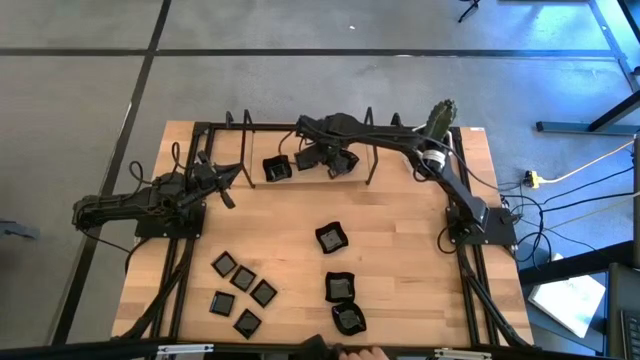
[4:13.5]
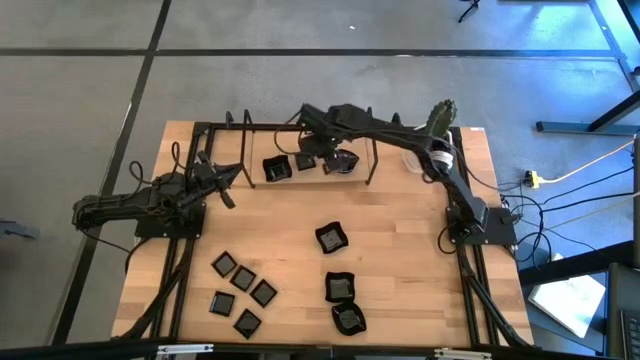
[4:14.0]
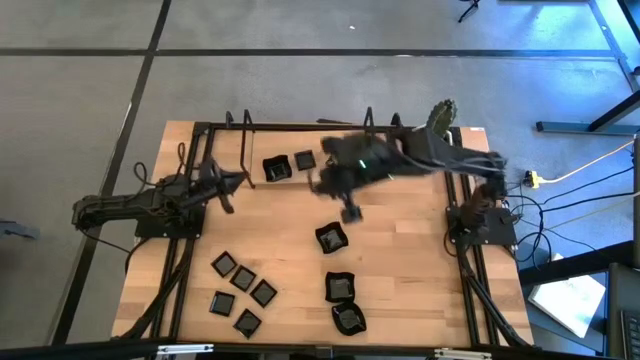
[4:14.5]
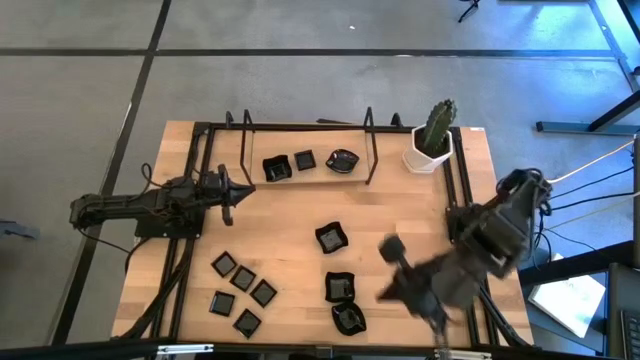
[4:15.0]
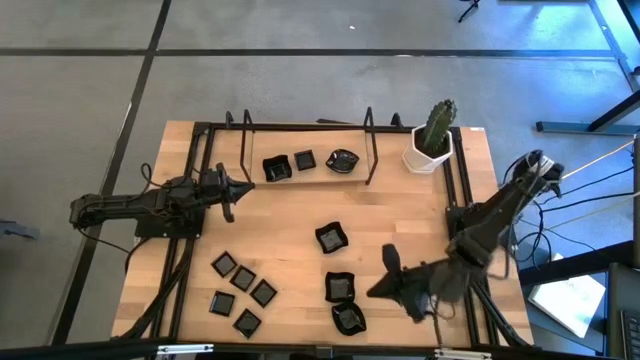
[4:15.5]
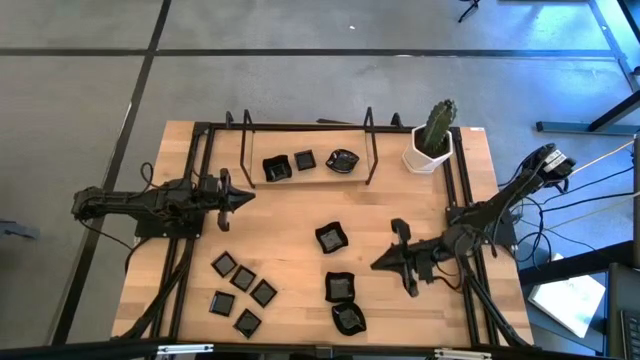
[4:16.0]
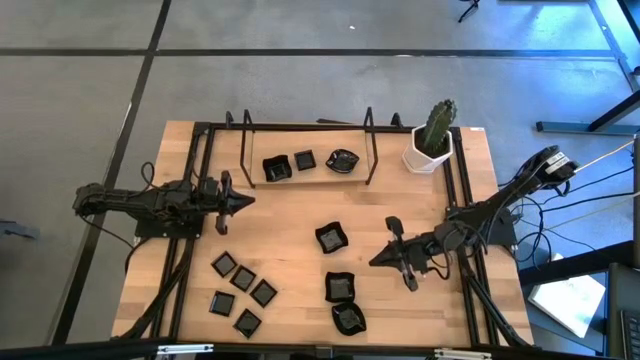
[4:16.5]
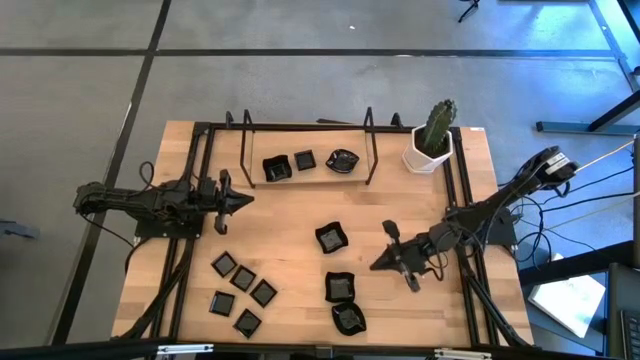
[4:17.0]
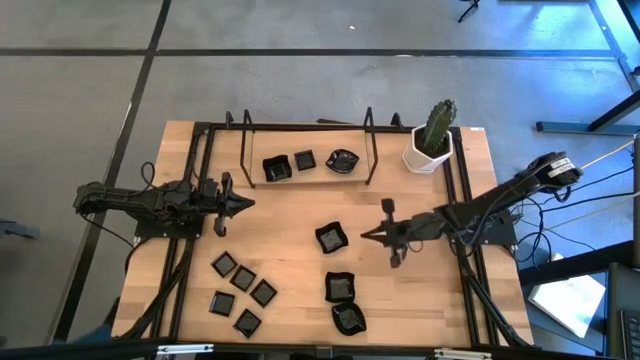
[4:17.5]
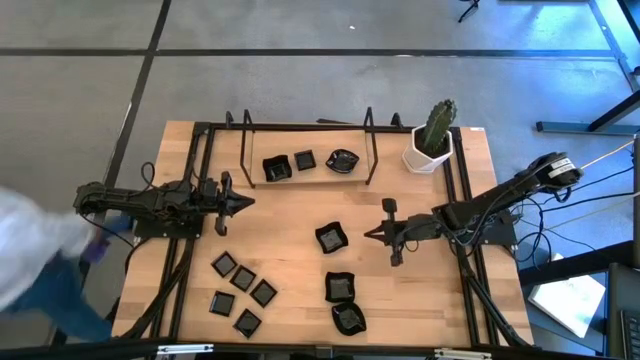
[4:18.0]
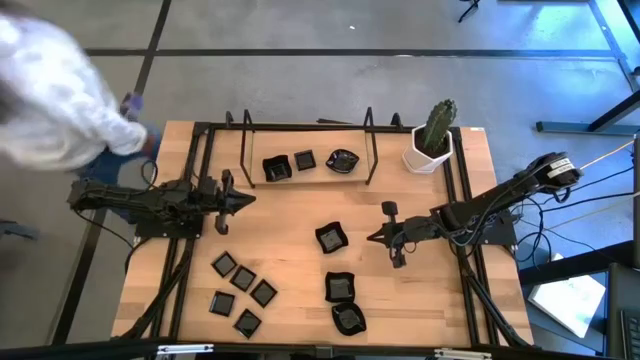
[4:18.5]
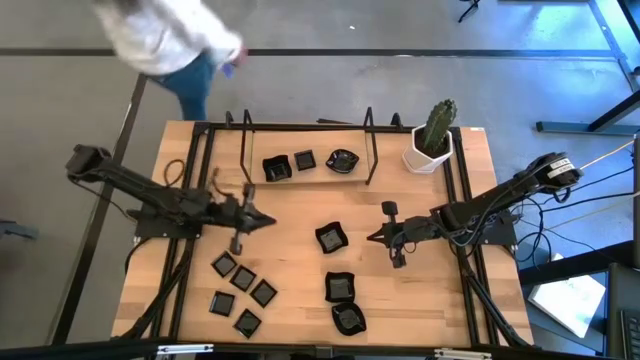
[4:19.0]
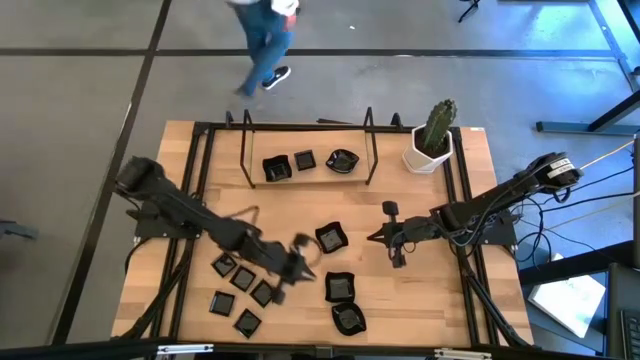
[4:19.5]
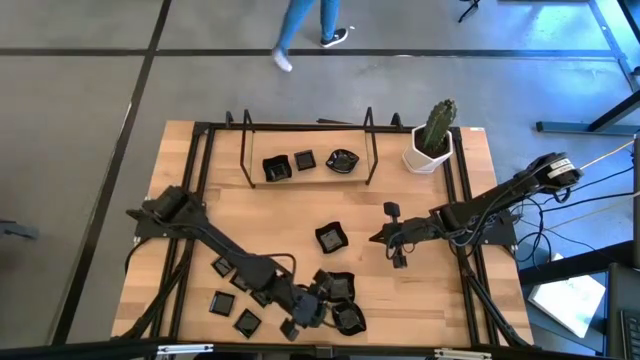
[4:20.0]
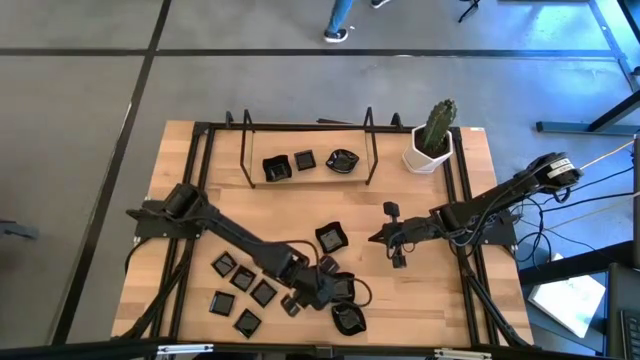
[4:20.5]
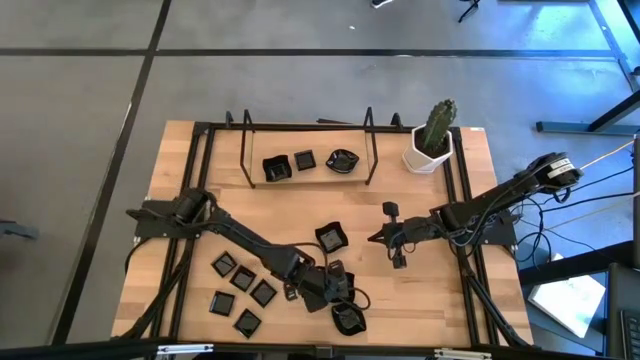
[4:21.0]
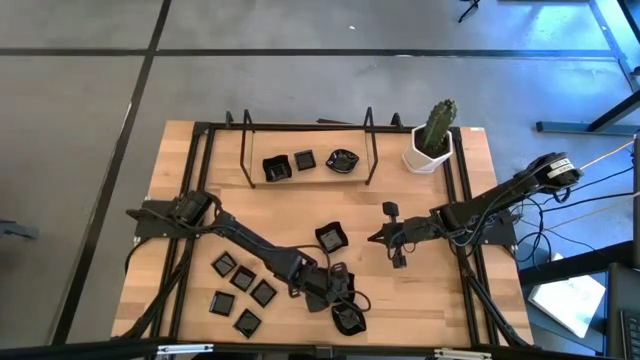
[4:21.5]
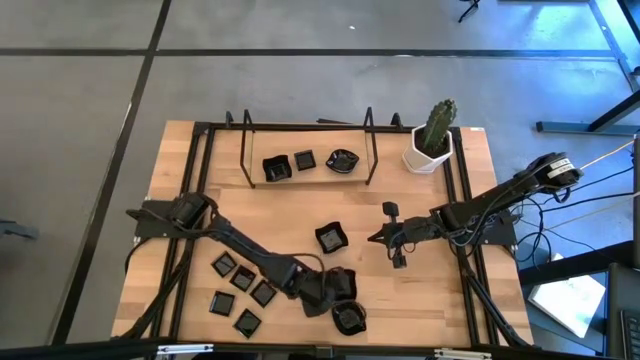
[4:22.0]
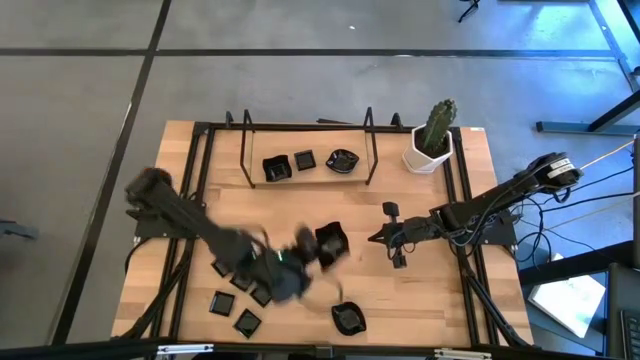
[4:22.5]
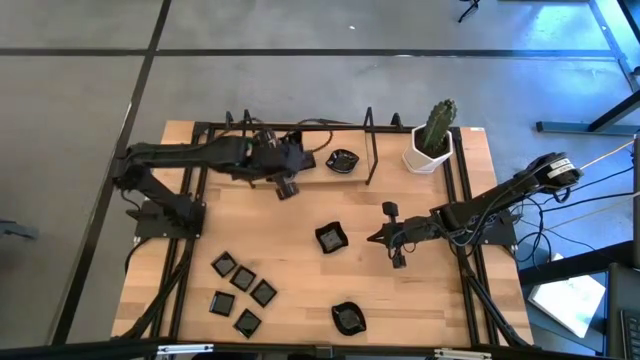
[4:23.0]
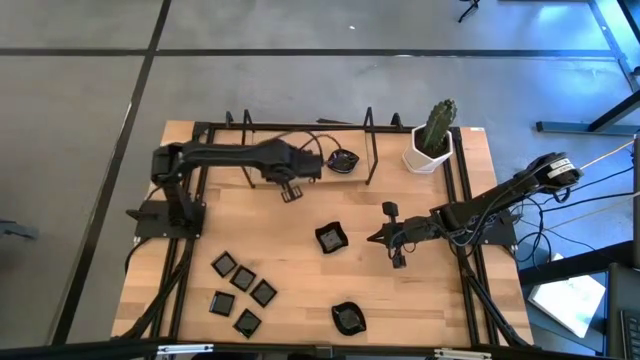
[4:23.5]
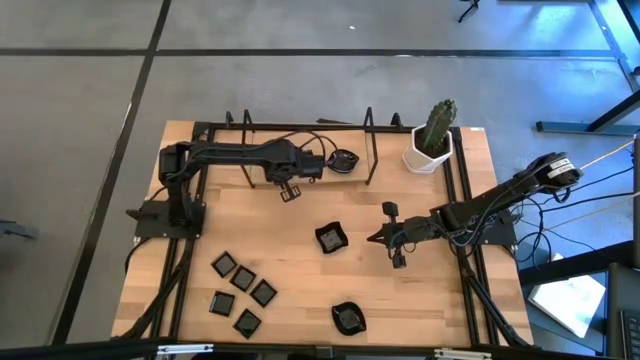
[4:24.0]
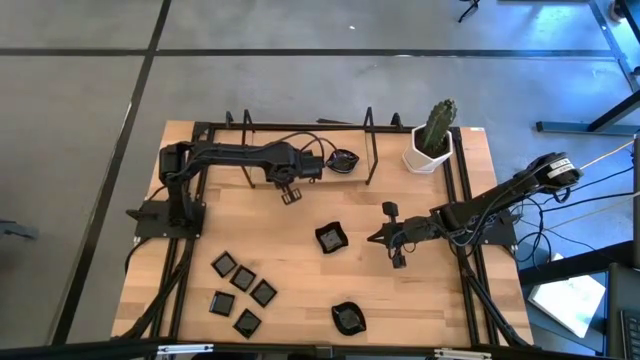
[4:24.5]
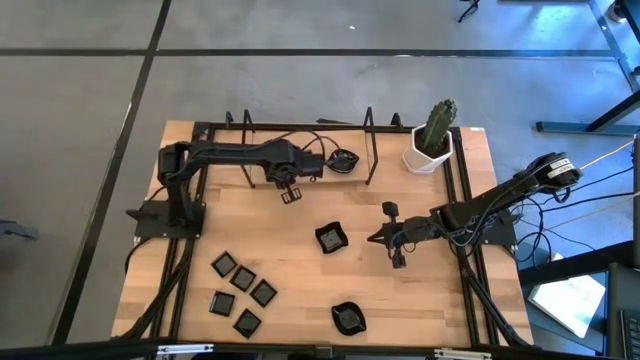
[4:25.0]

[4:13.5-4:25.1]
Task: Pick & Place Mini shaped plates
Stack the distorted square plate on top of the distorted square plate on the shelf

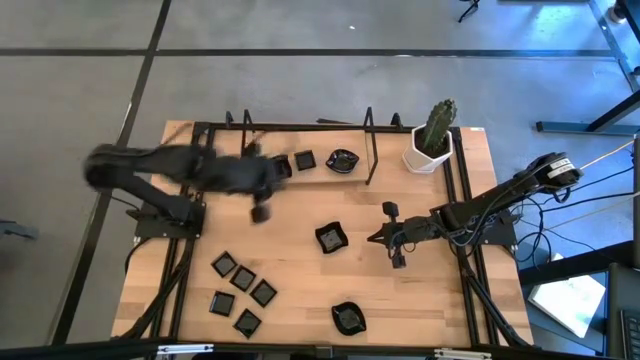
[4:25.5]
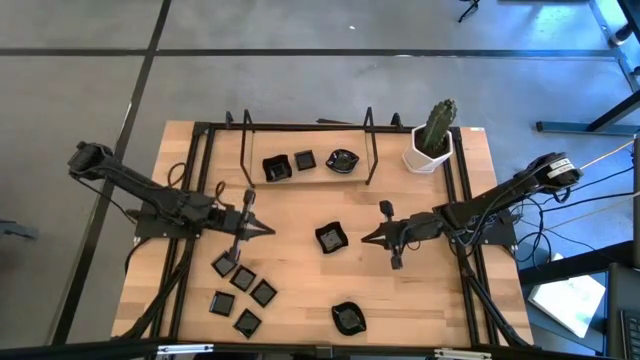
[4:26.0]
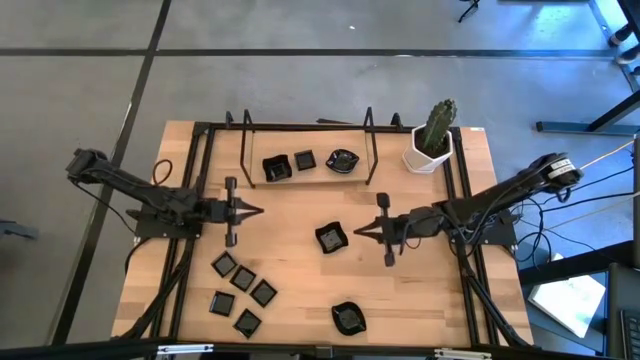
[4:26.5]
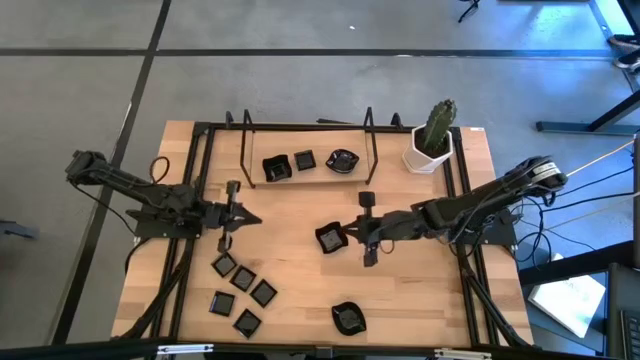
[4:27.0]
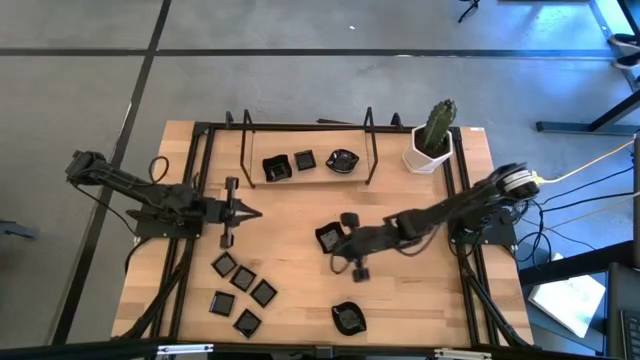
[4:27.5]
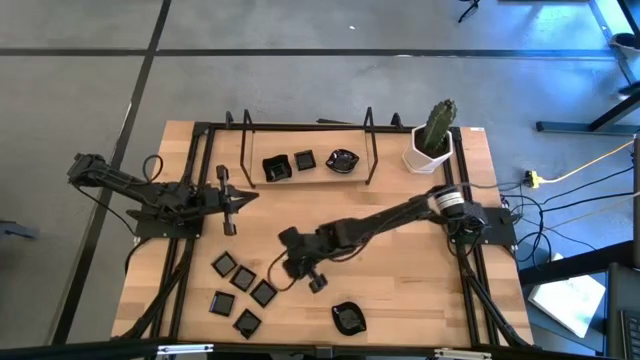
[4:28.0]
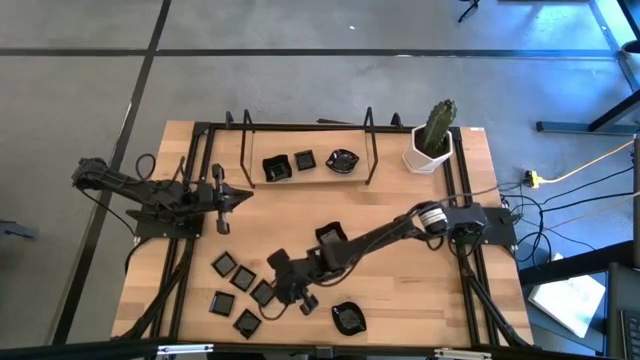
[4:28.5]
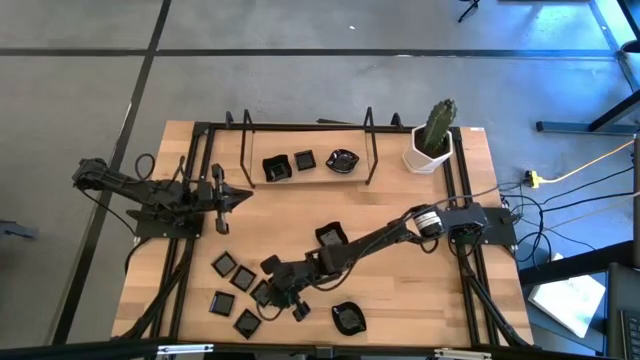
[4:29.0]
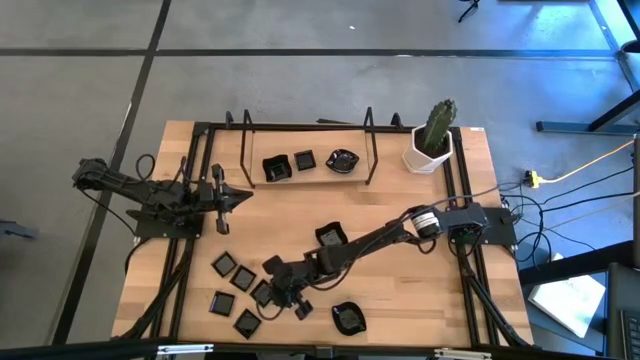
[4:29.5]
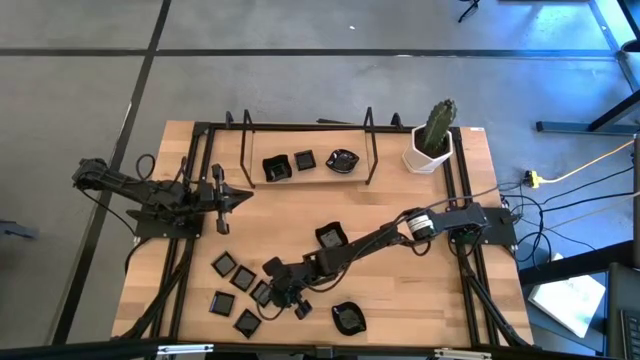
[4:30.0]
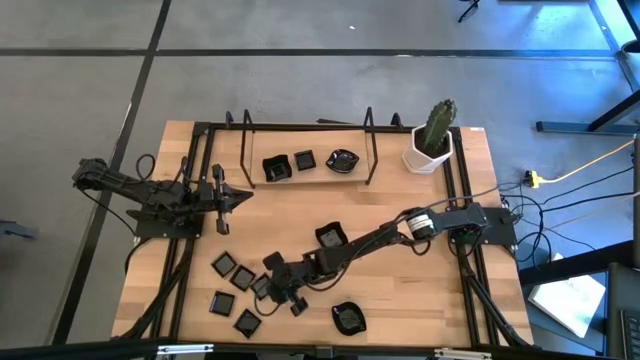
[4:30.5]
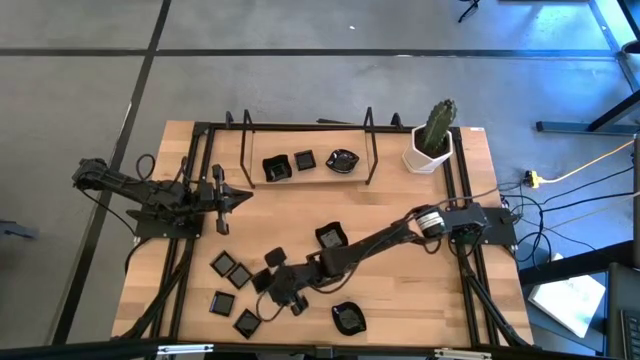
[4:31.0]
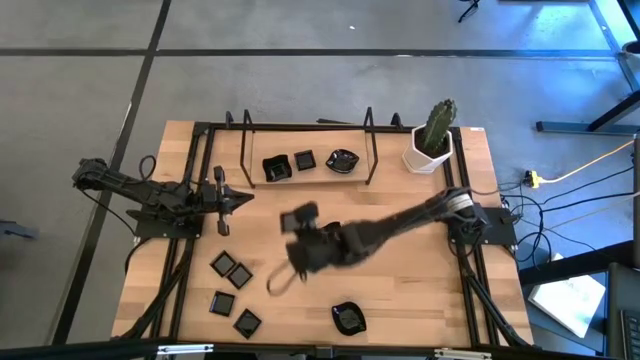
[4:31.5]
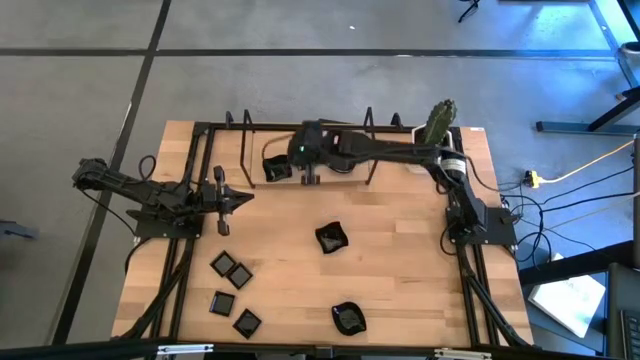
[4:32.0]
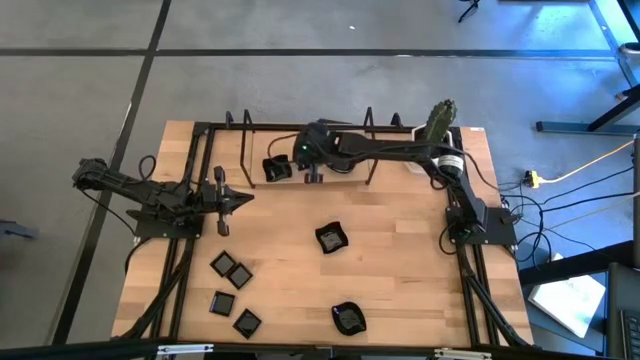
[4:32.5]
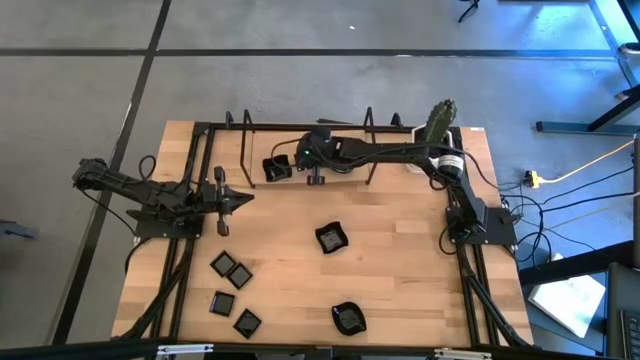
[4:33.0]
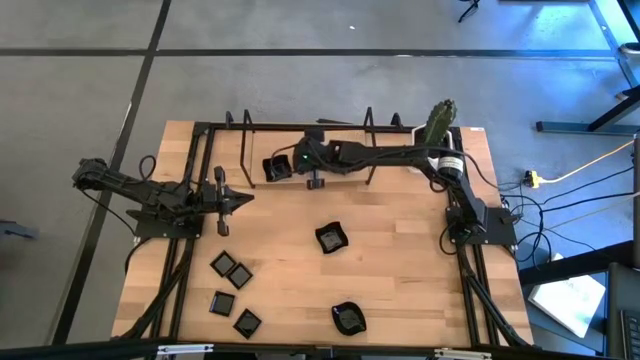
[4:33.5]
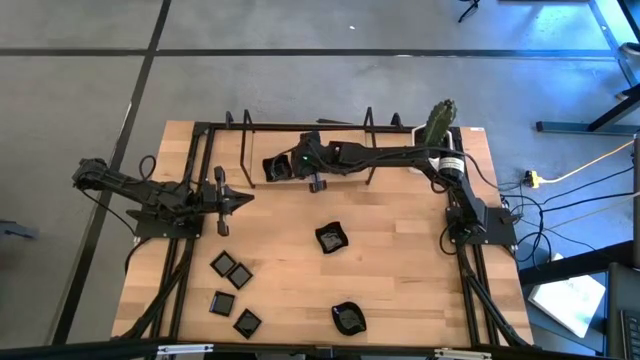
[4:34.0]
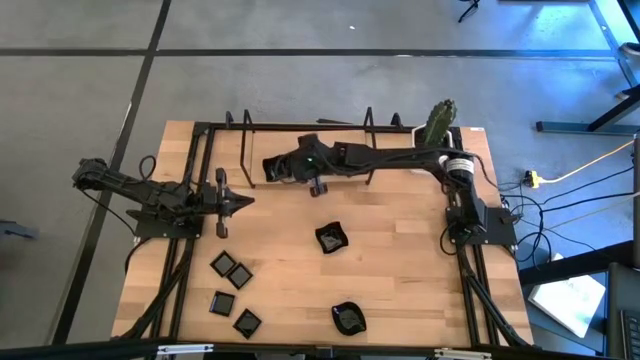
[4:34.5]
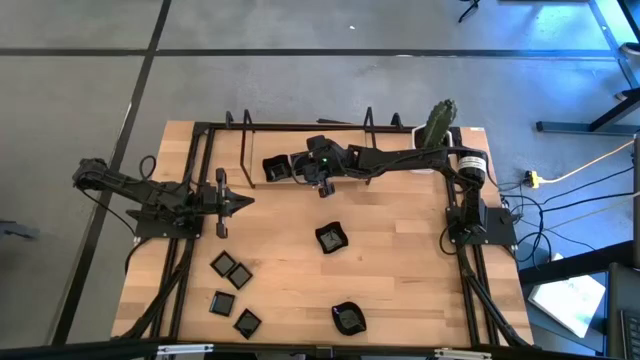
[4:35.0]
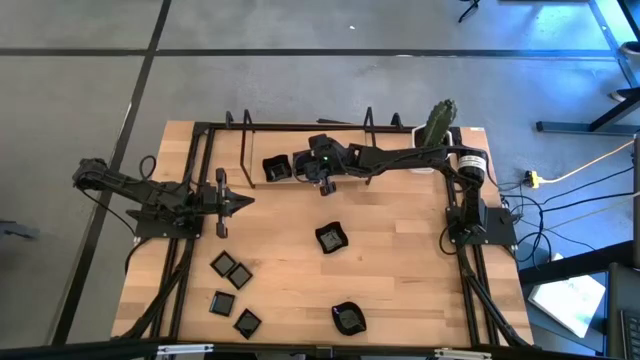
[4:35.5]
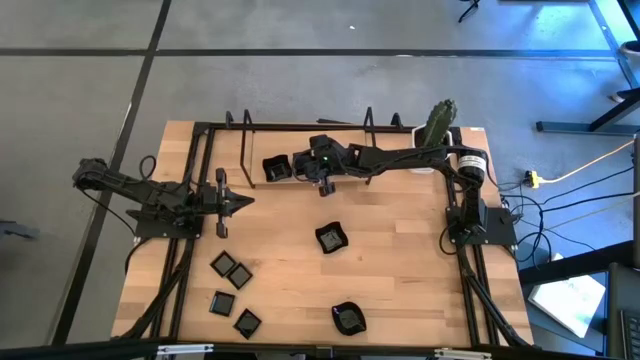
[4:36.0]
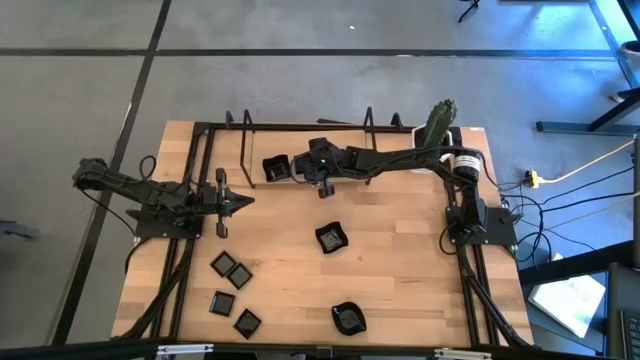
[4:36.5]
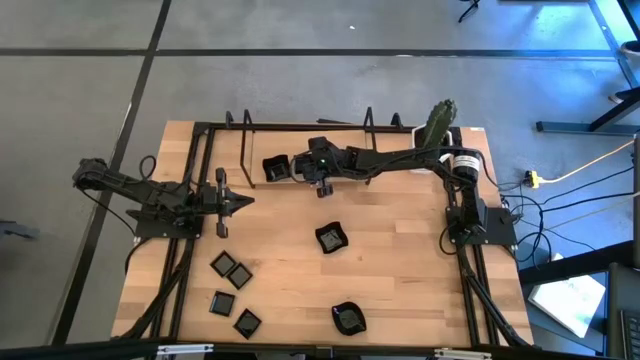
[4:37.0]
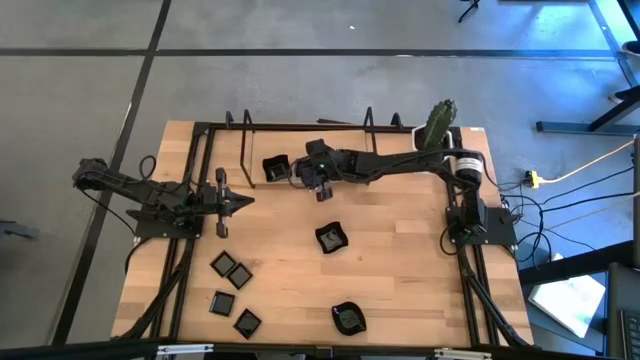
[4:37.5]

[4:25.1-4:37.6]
Stack the square plate on top of the square plate on the shelf
